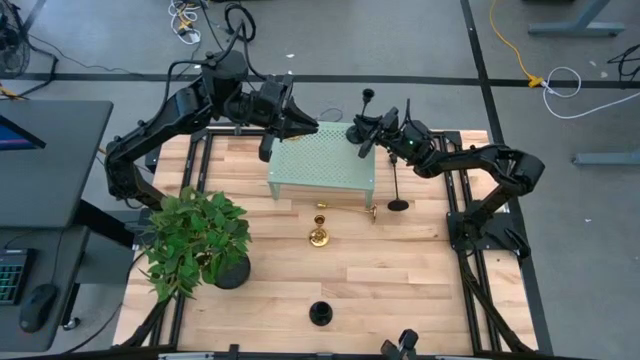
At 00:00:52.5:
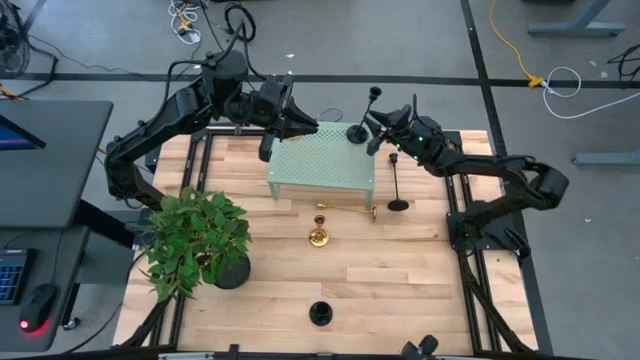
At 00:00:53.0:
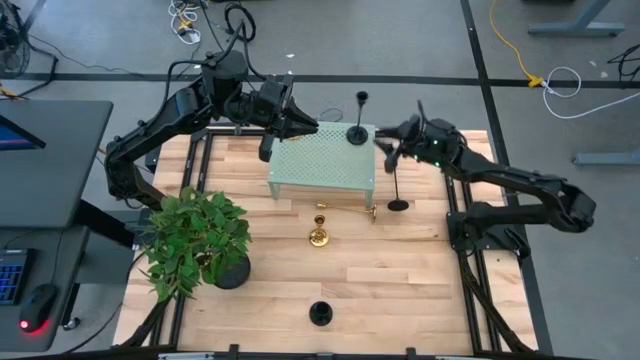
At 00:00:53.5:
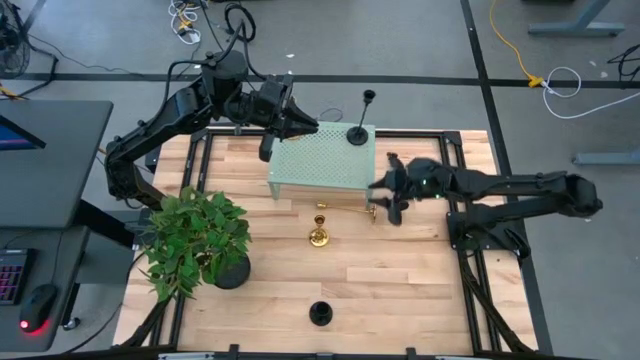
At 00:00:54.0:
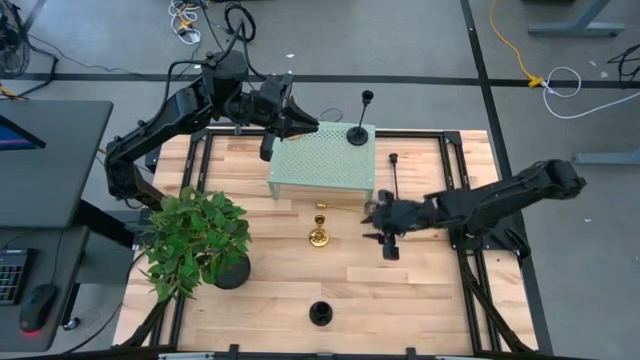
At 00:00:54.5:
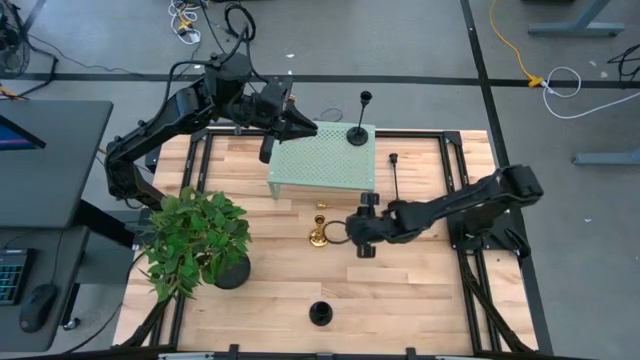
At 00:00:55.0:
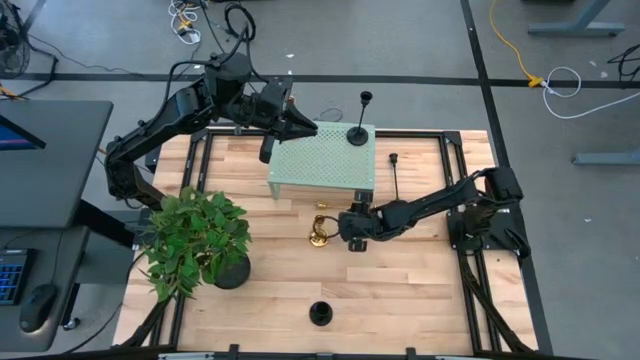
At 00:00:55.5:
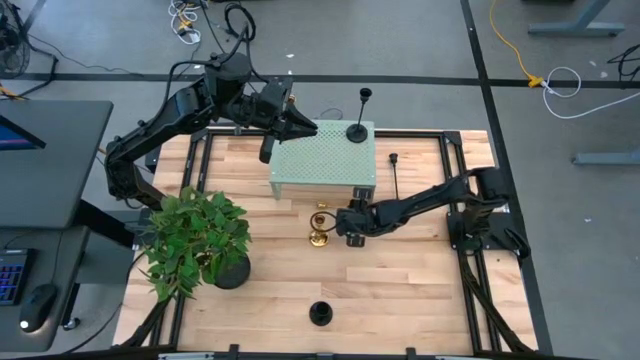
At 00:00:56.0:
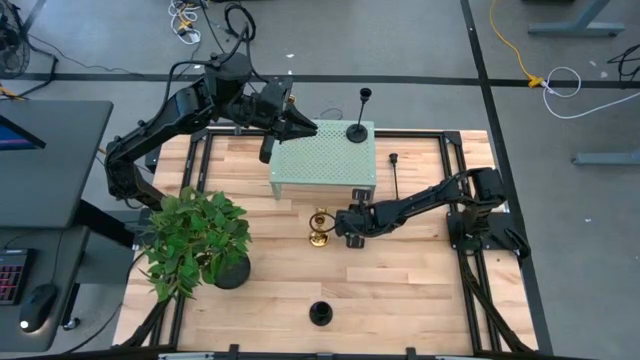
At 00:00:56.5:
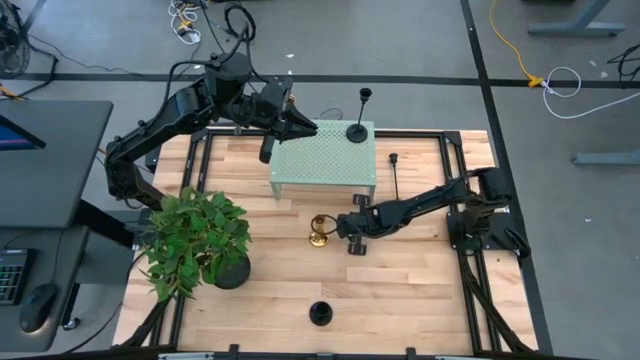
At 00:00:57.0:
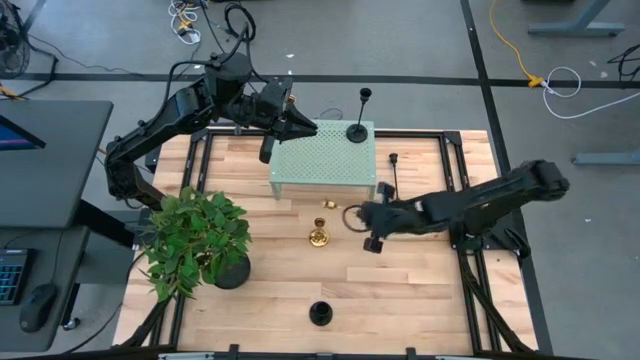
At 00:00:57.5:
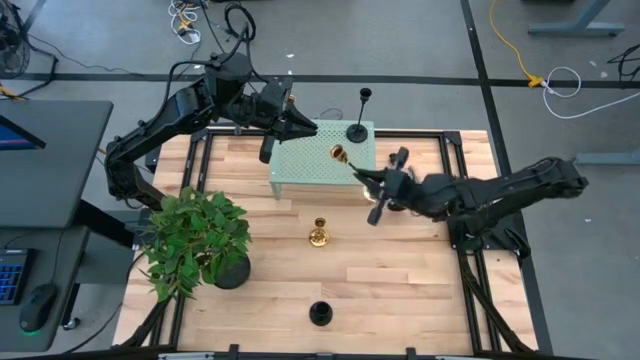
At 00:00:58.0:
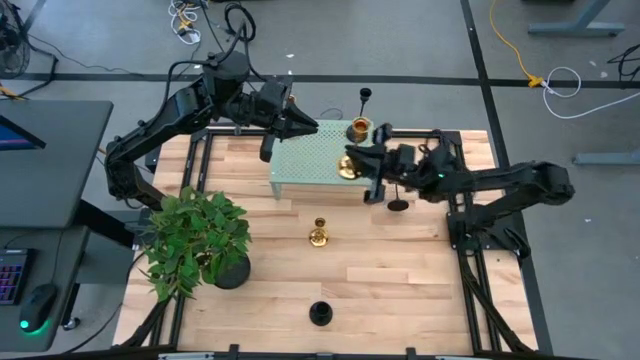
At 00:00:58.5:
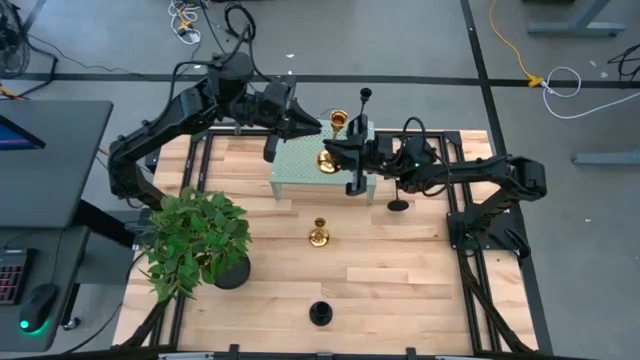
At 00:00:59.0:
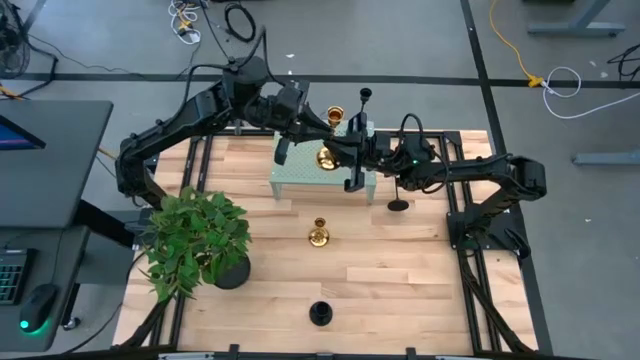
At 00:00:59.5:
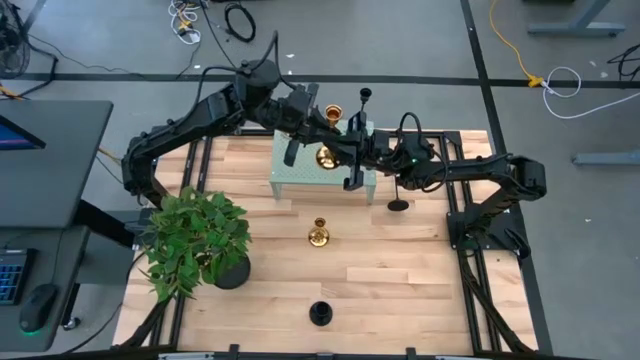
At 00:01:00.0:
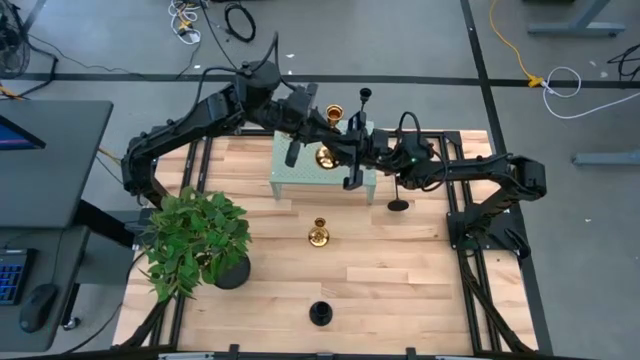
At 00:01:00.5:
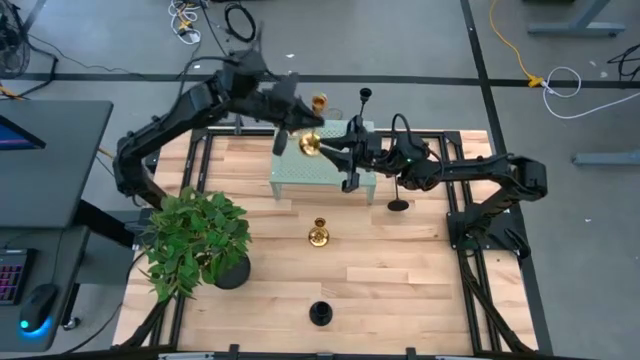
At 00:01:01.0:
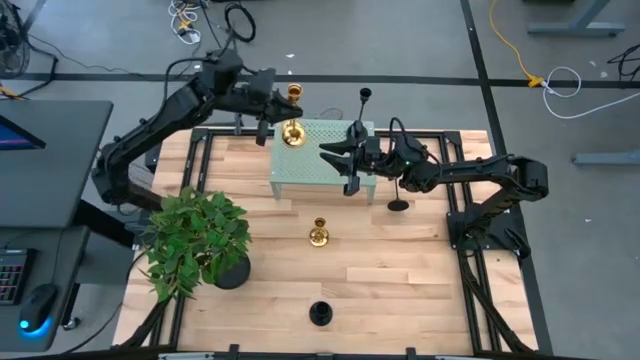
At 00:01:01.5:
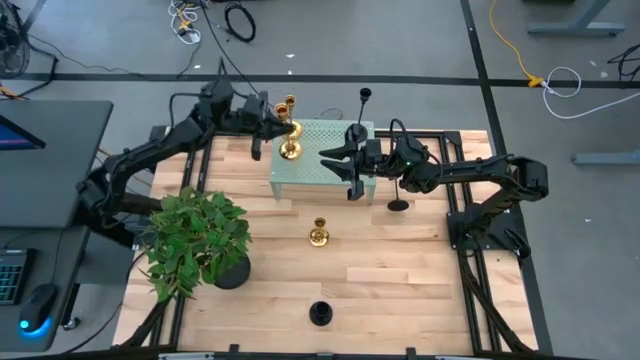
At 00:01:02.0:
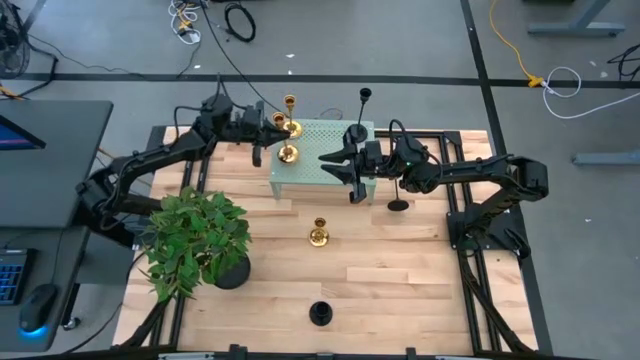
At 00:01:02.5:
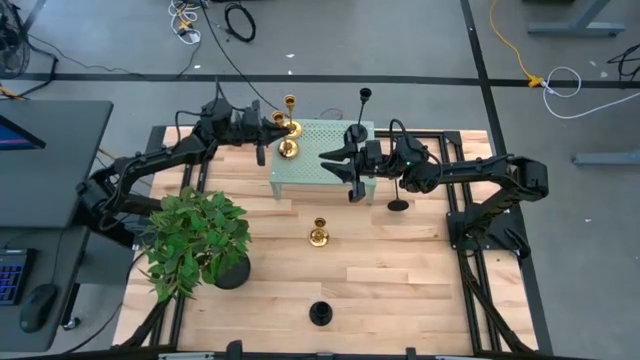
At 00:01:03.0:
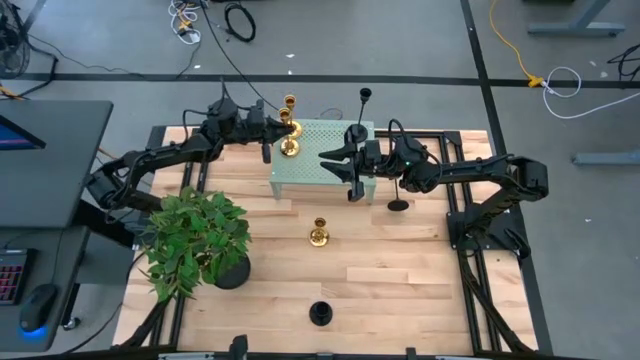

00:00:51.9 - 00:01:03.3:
Task: Pick & Place candle stick holders
Put the top gold candle holder on the shelf

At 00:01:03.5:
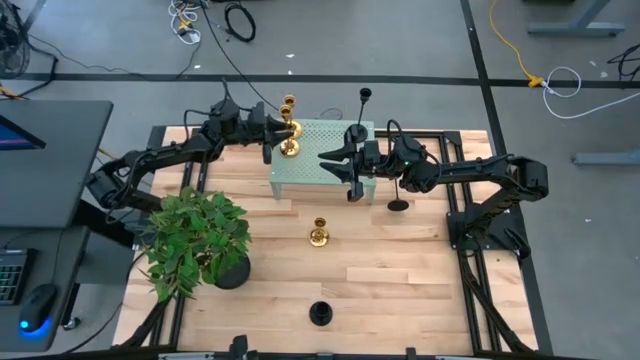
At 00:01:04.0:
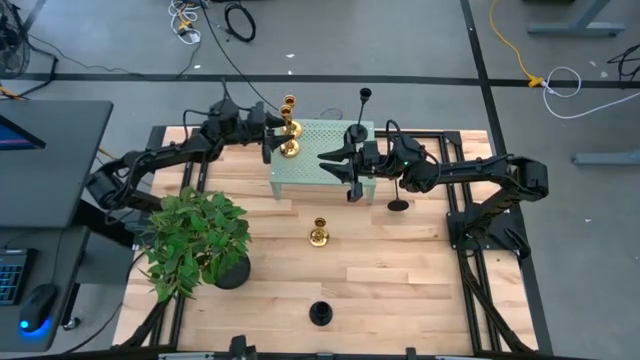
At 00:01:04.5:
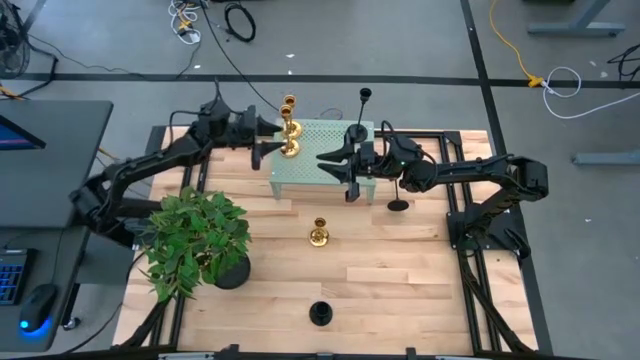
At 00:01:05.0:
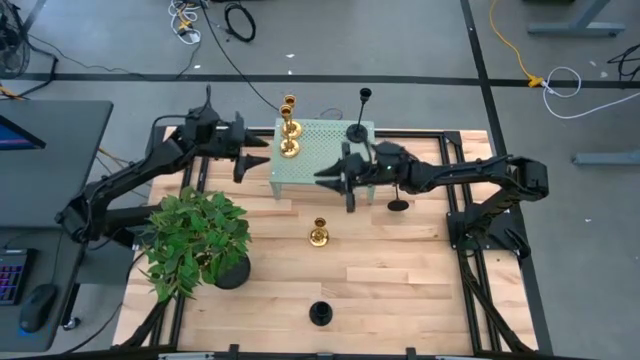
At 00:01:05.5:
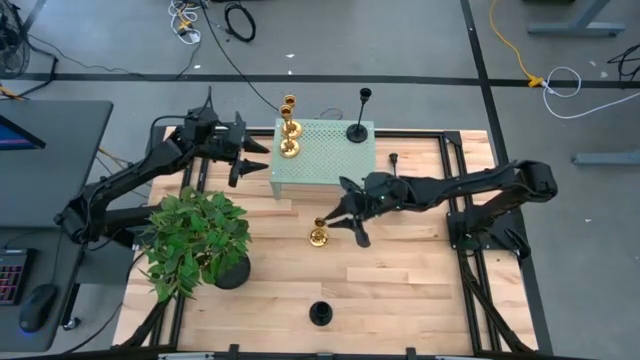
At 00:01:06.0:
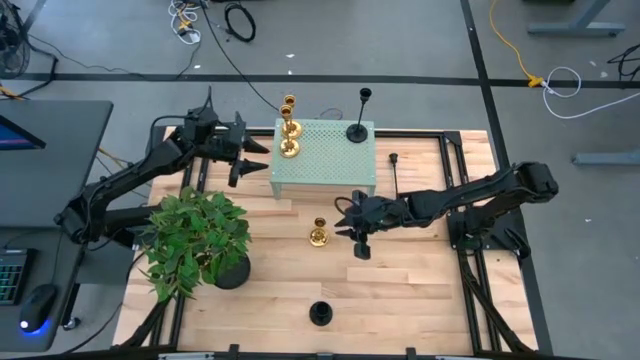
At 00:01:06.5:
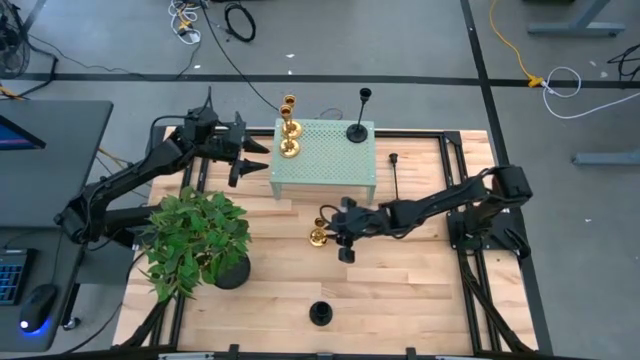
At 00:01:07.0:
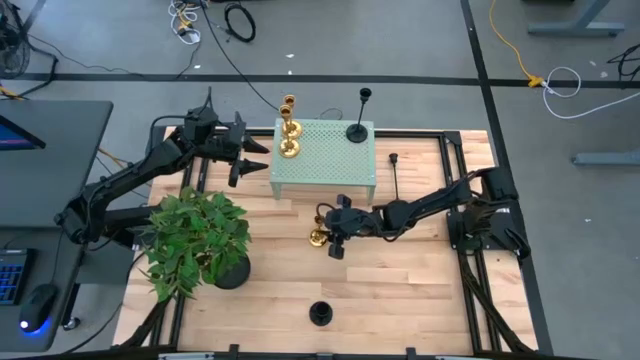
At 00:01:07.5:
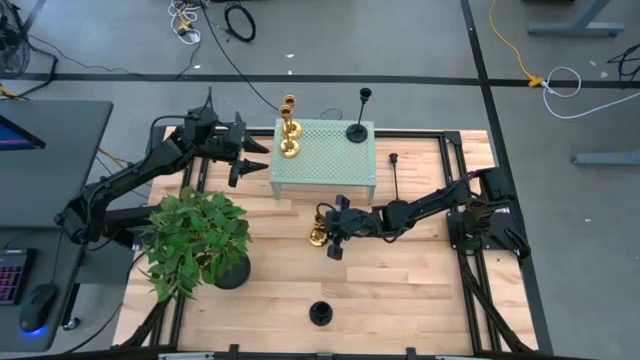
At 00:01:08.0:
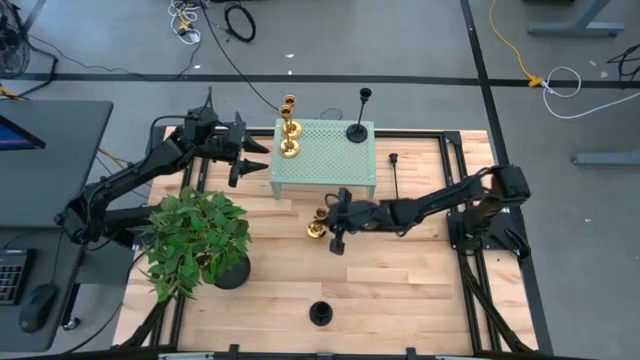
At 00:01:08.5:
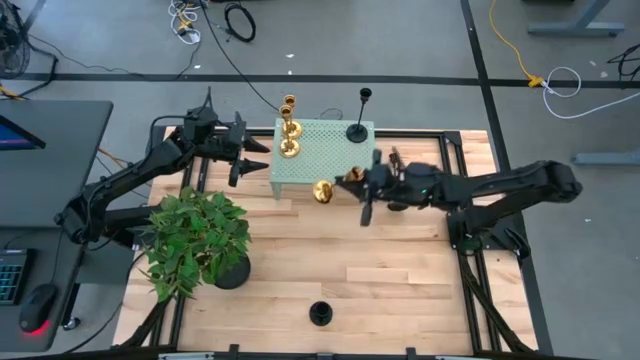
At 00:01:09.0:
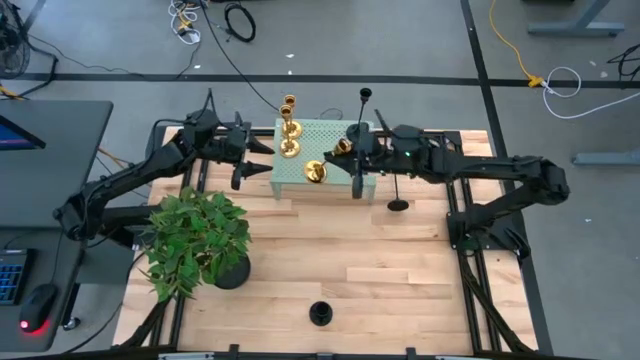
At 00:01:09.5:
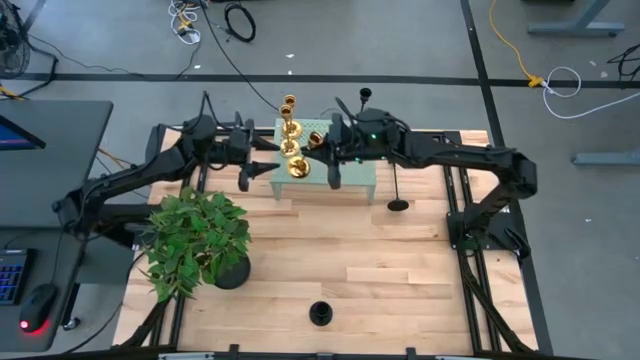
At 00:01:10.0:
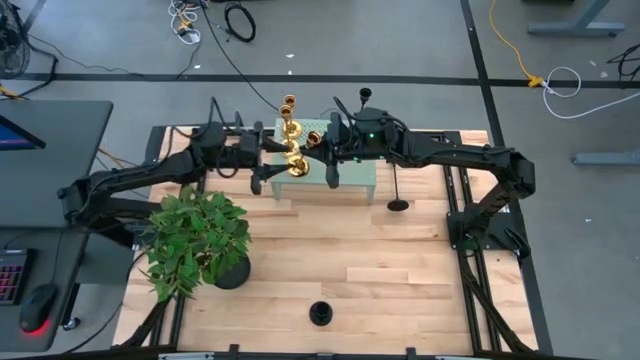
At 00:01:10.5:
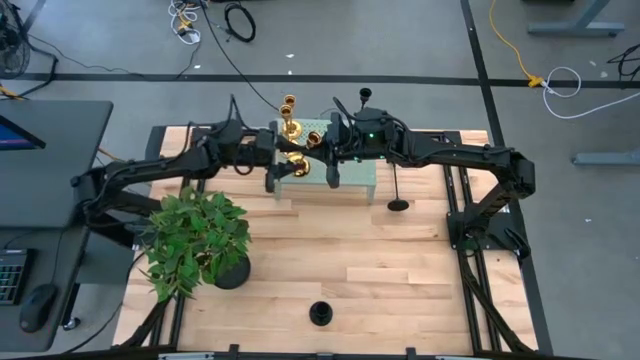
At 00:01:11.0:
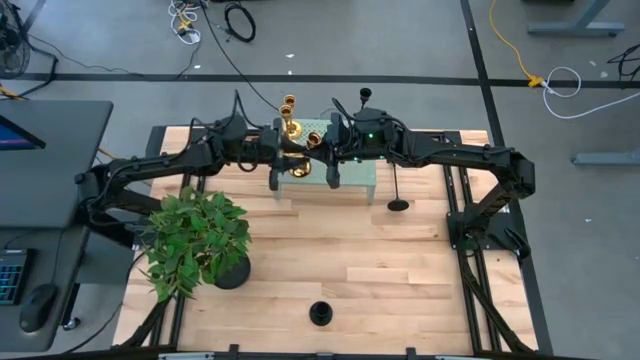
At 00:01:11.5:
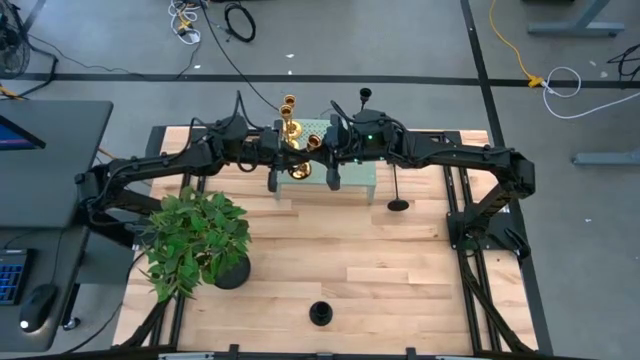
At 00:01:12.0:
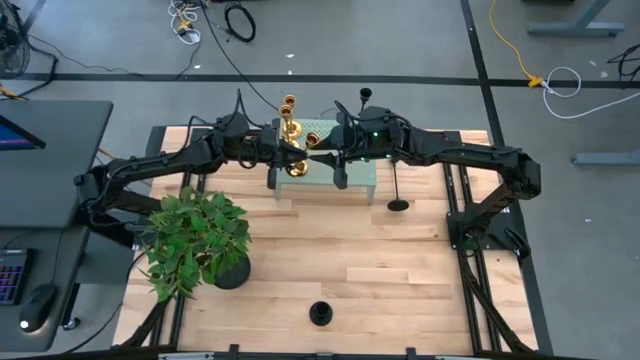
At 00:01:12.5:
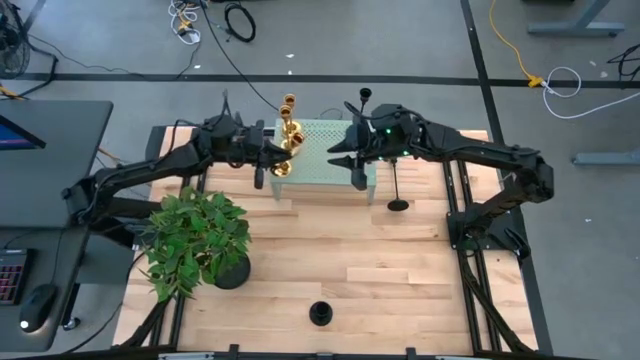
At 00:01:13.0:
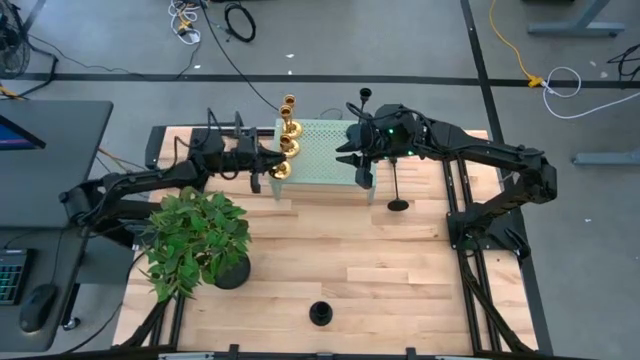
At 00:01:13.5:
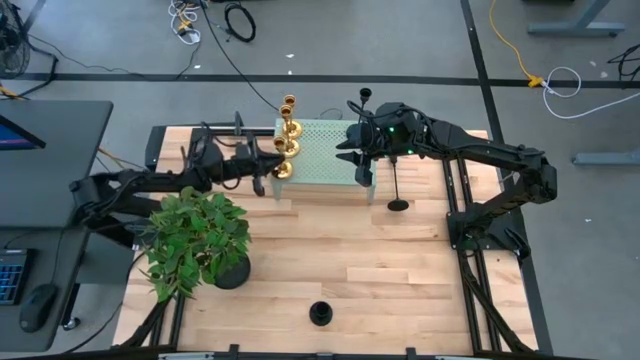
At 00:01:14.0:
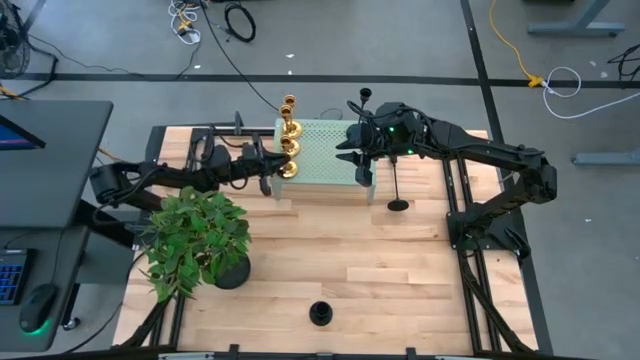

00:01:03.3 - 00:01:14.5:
Put the gold candle holder on the shelf
